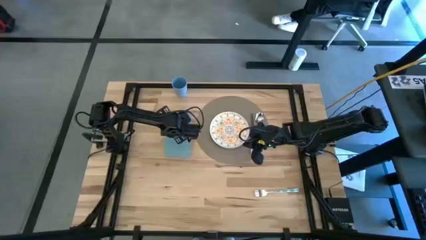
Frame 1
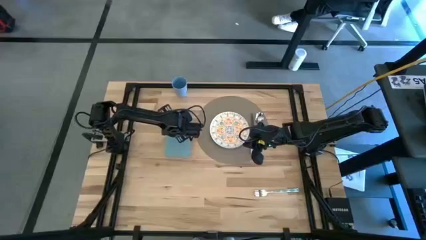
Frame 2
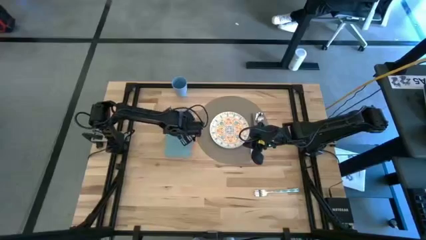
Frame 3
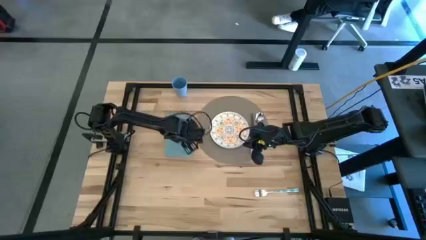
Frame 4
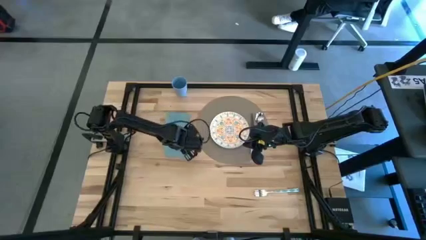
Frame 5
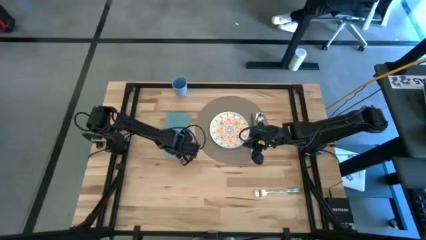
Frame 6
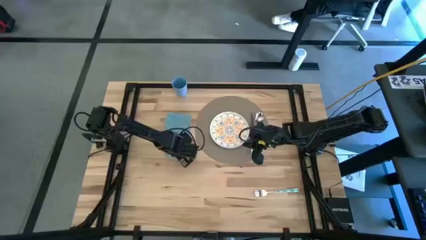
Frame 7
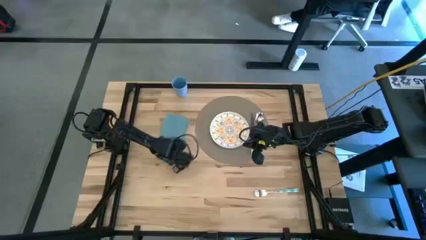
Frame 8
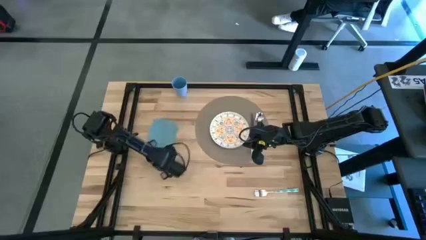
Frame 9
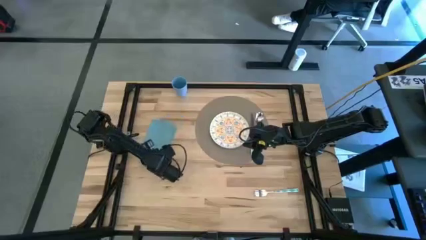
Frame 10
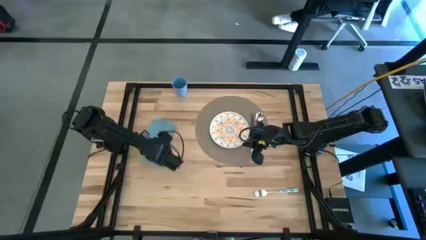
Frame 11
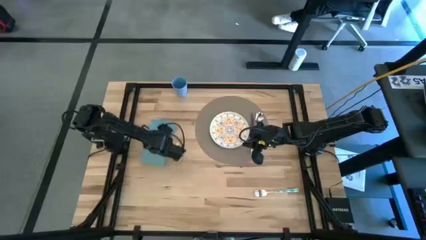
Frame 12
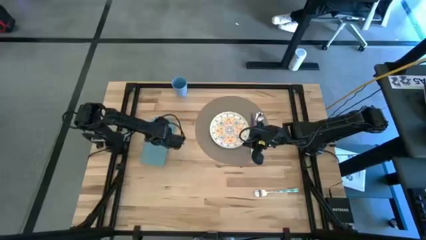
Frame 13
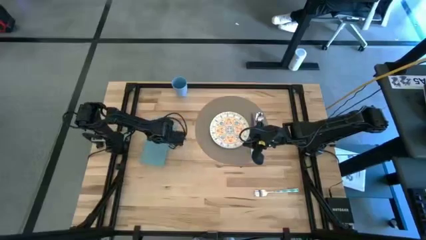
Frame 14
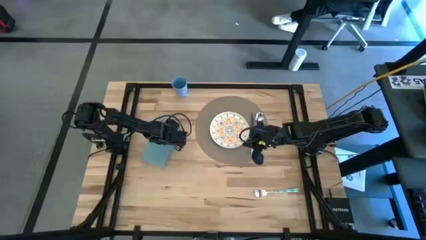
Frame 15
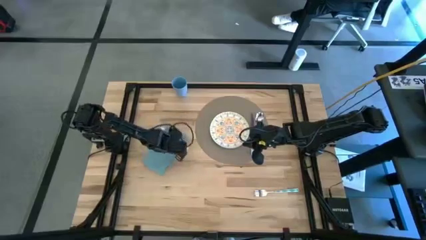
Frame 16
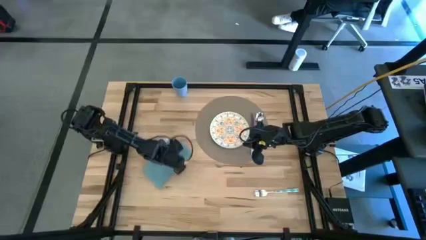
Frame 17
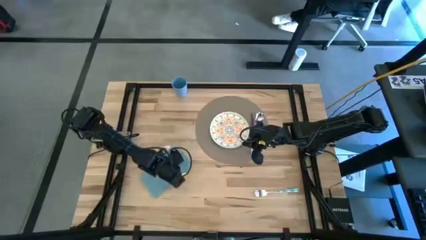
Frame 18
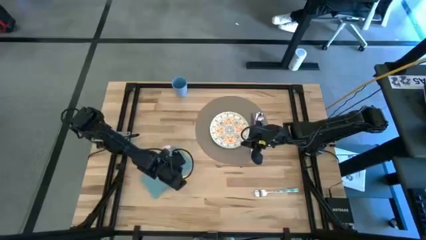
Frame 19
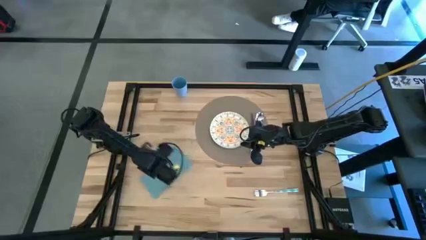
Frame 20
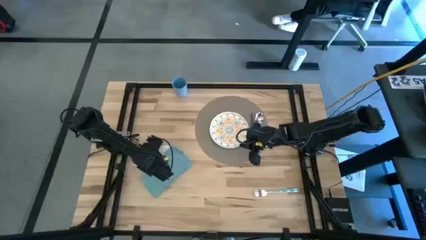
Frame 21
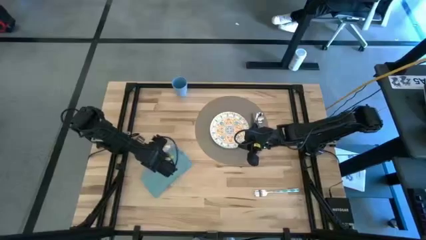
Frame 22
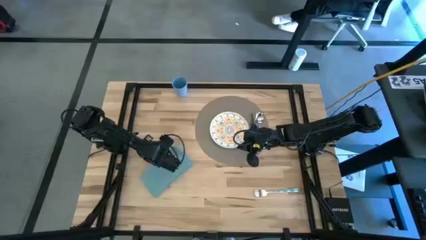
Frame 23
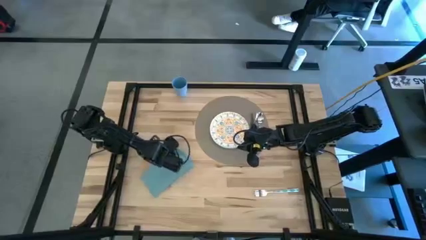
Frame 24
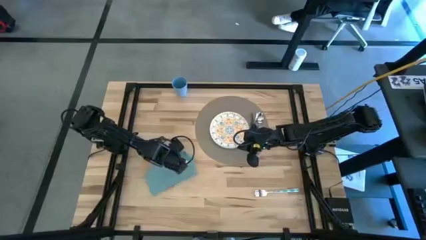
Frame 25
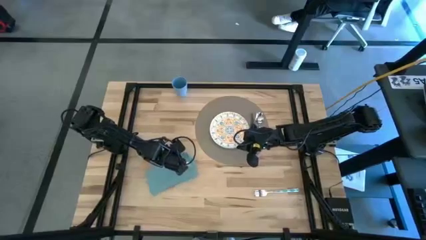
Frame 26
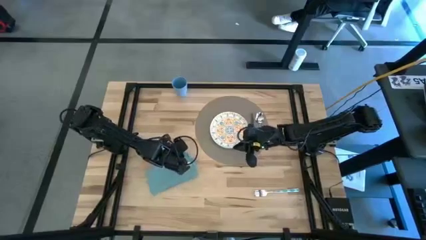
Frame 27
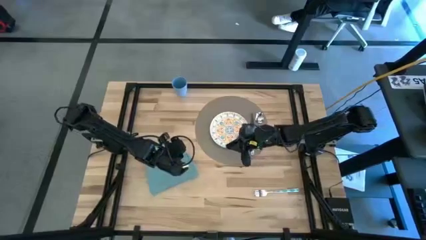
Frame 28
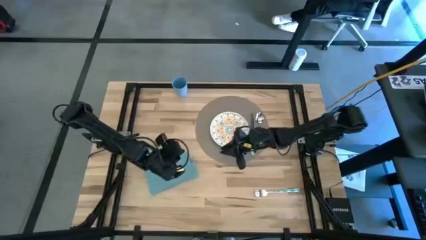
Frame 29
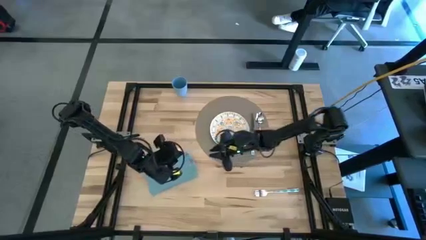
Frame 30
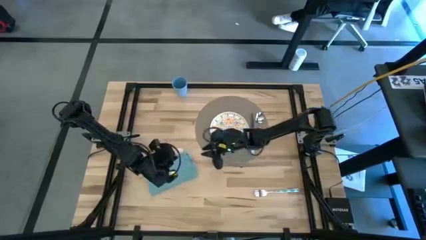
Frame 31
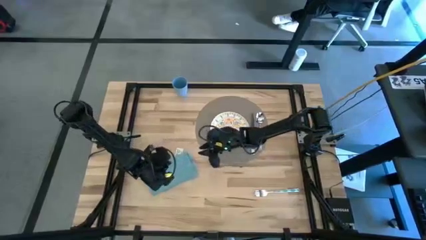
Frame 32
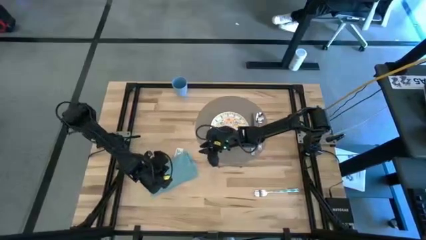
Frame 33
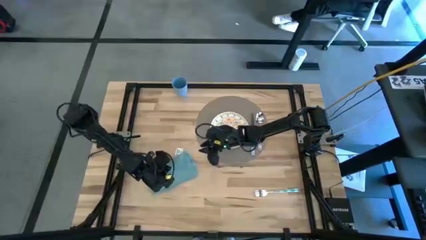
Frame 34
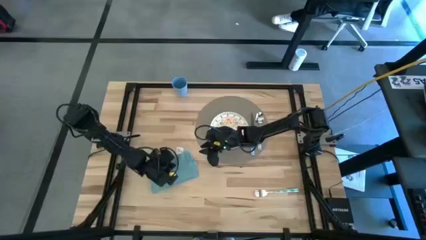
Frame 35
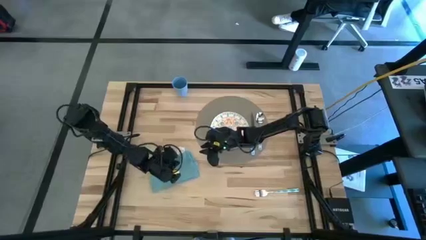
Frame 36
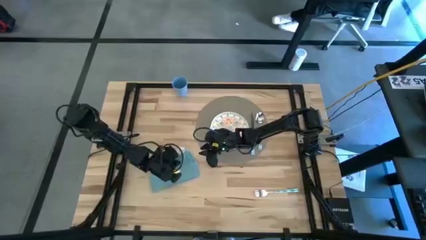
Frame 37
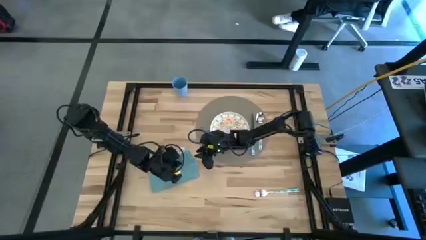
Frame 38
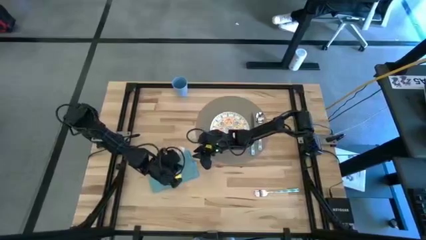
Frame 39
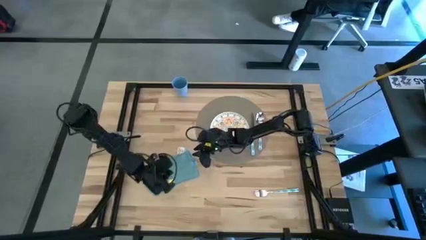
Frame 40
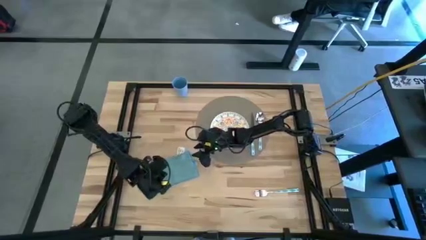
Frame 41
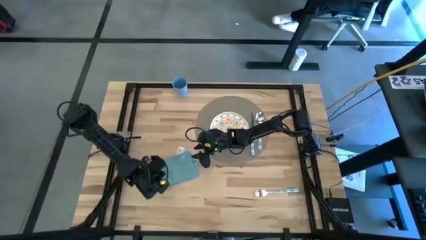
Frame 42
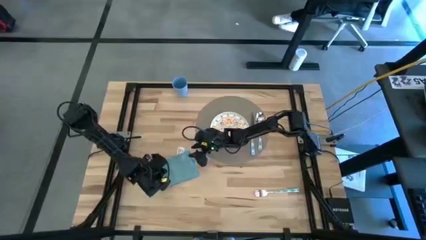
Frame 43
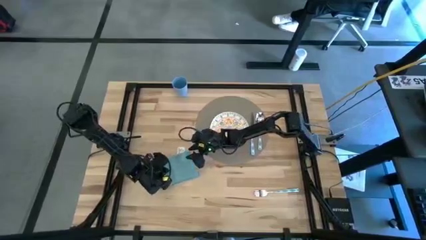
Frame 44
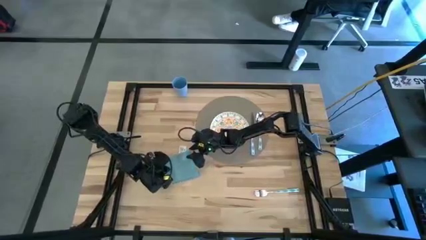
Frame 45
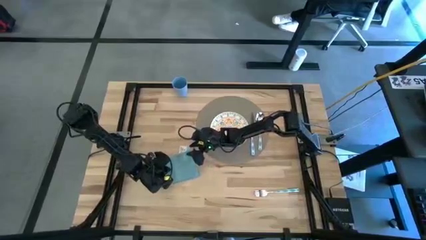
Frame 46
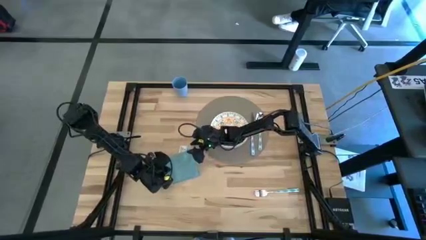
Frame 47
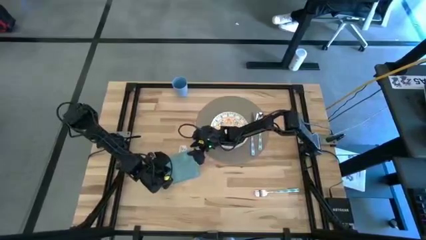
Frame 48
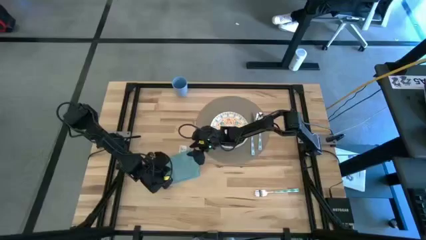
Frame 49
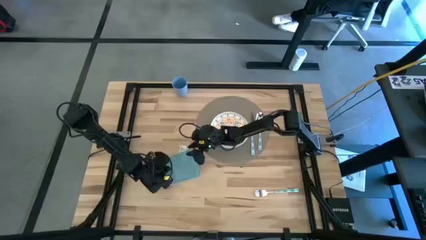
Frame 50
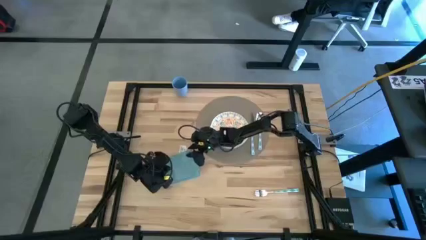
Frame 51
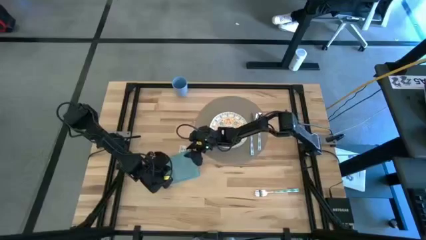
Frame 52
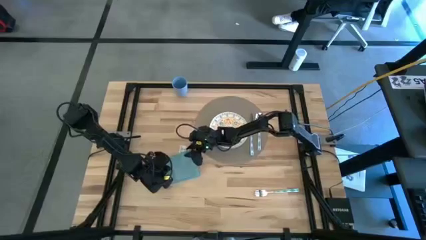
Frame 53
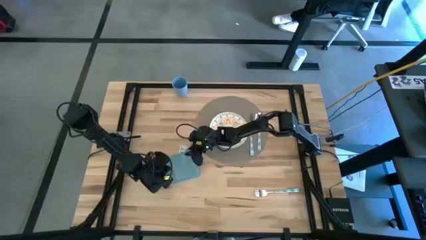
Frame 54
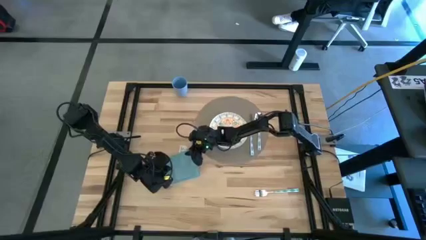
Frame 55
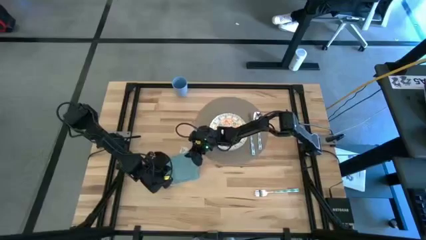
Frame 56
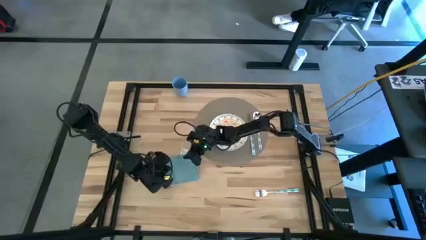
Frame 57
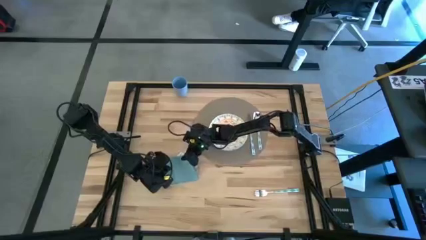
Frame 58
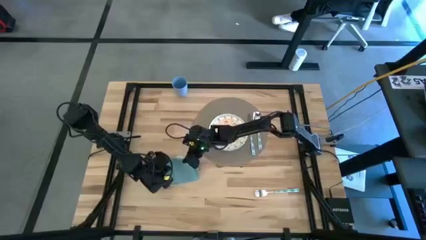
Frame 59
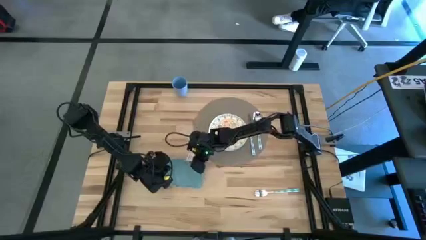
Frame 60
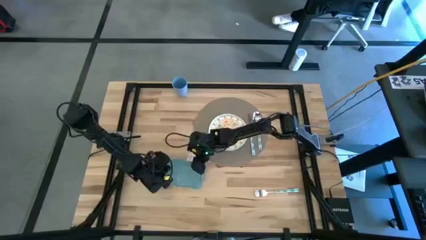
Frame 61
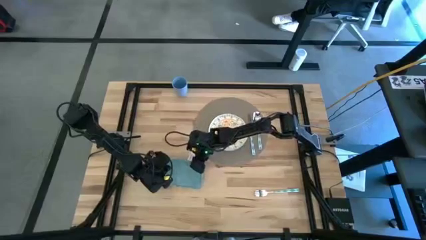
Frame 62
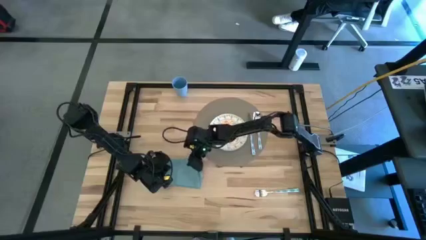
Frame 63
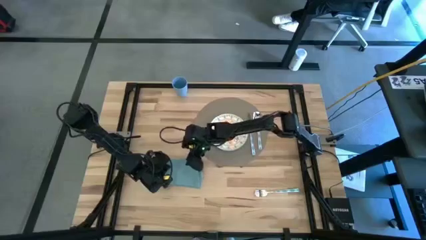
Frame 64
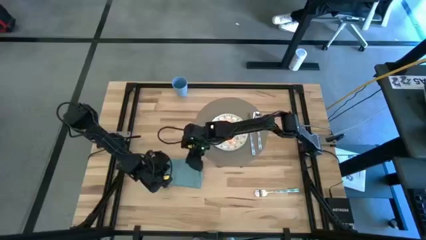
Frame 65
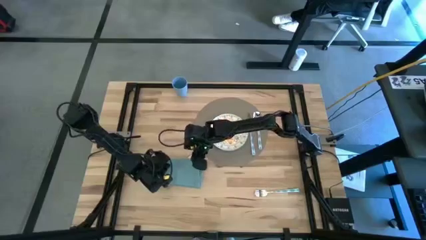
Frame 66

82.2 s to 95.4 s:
Task: Set table place
Move the blue napkin to the top left of the table
